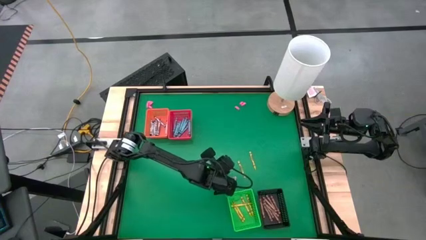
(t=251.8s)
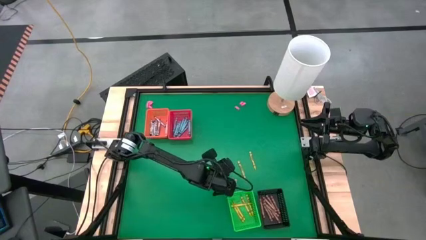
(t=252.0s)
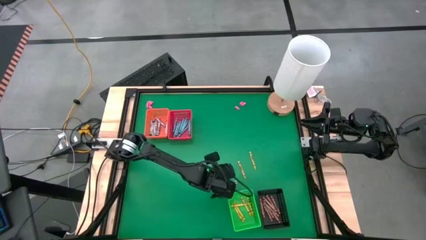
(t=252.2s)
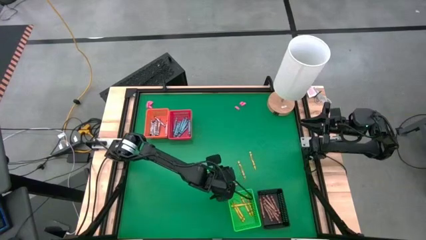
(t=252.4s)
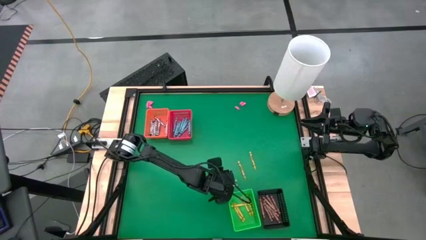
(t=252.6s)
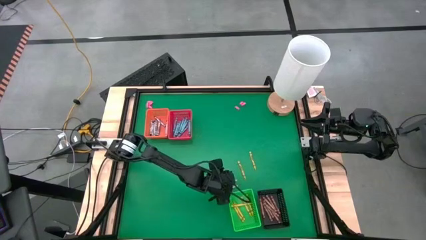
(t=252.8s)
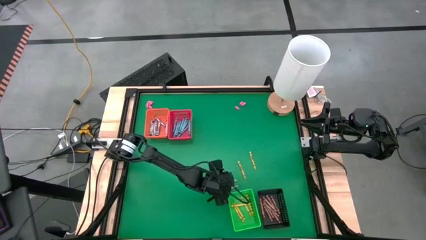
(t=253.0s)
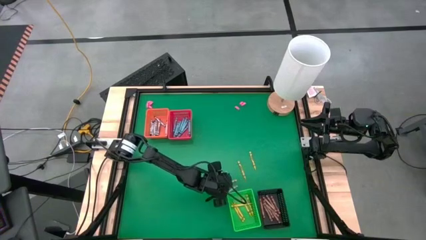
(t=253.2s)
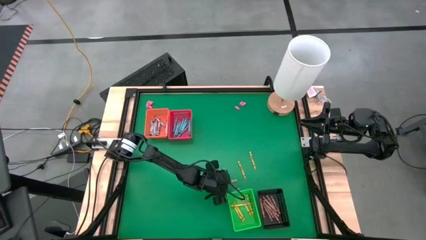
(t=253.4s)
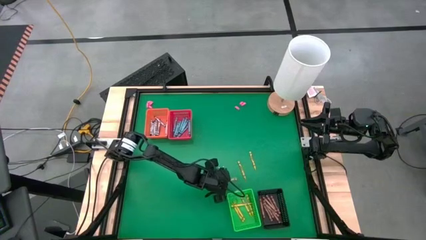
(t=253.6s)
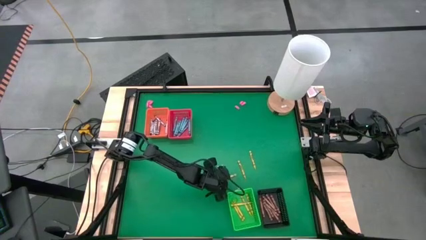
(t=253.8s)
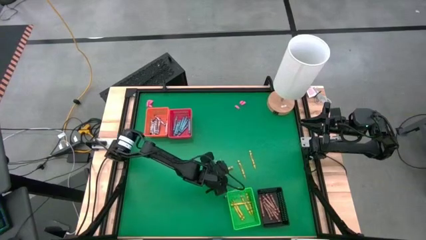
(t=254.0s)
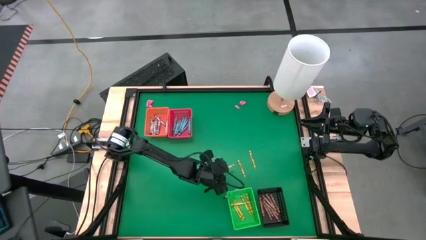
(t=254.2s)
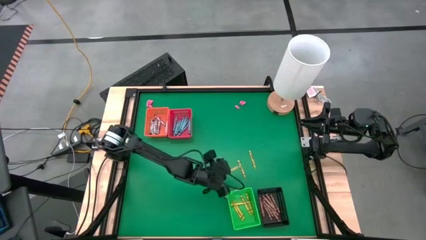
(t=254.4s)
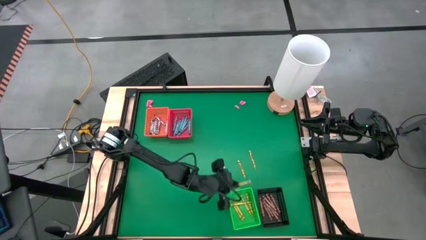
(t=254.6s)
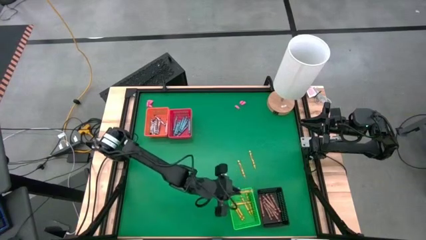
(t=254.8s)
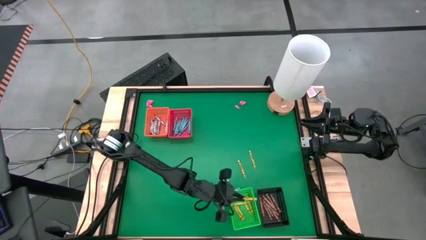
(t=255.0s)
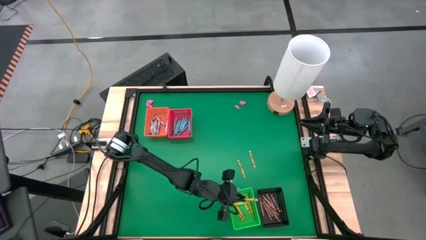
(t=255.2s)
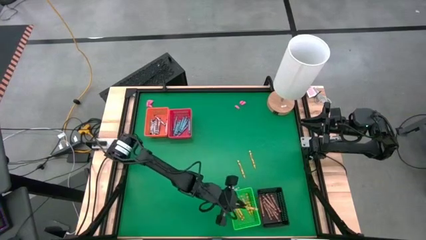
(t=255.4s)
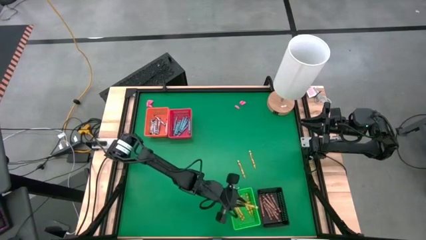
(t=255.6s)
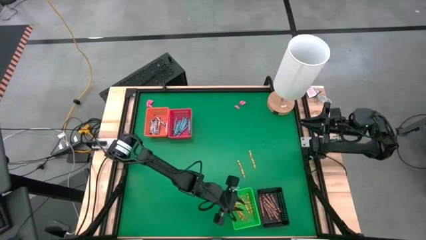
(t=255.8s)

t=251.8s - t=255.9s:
Task: Sort crayons
Put the yellow crayon into the green bin

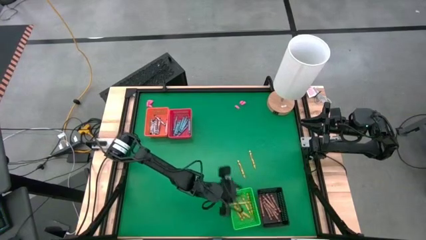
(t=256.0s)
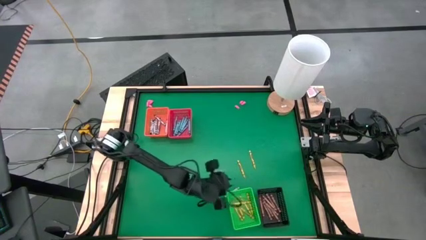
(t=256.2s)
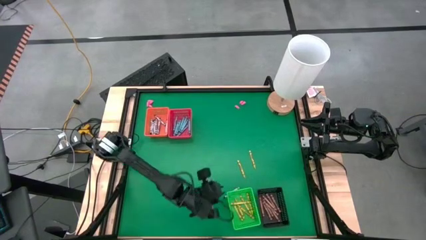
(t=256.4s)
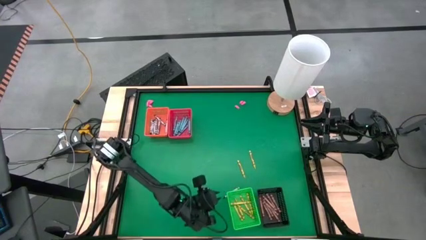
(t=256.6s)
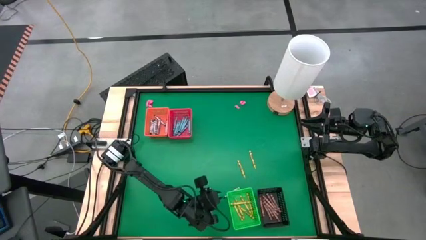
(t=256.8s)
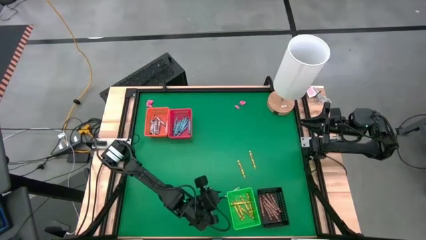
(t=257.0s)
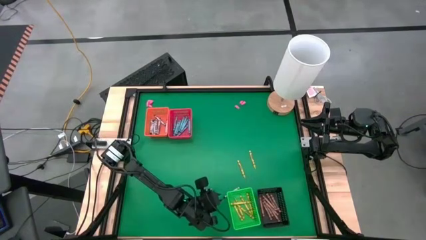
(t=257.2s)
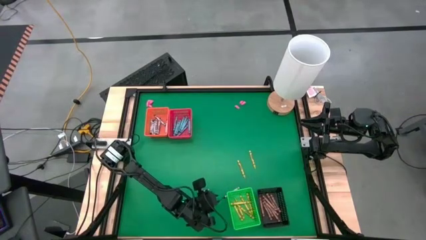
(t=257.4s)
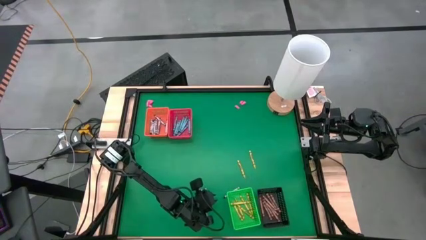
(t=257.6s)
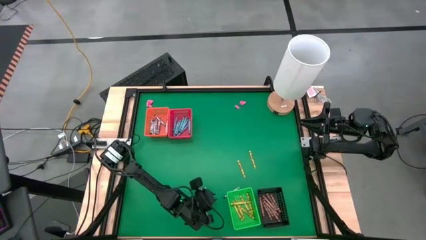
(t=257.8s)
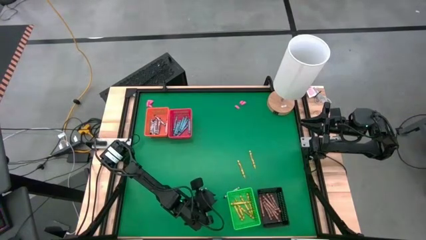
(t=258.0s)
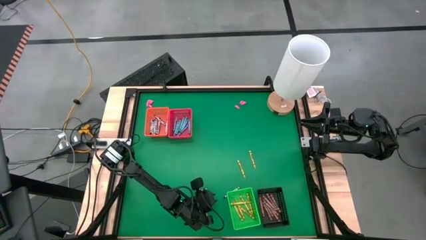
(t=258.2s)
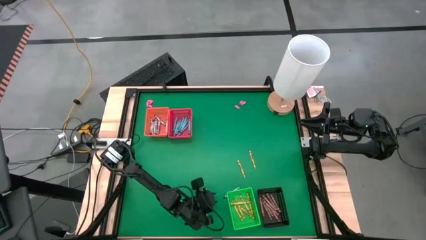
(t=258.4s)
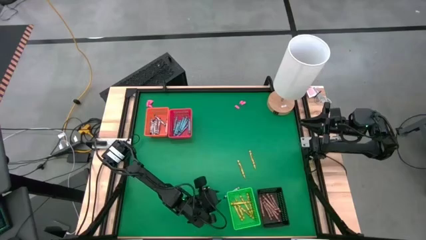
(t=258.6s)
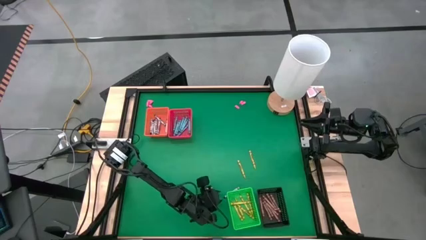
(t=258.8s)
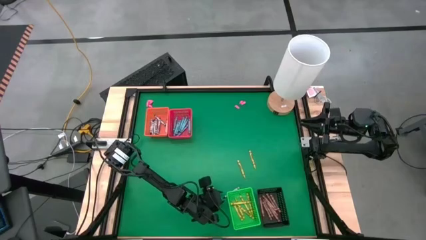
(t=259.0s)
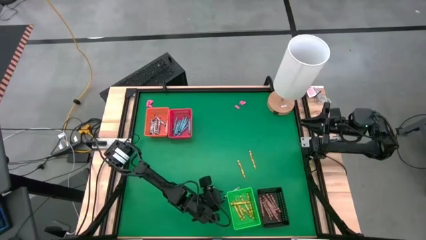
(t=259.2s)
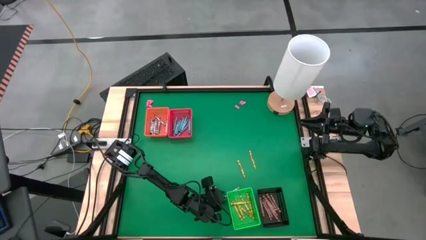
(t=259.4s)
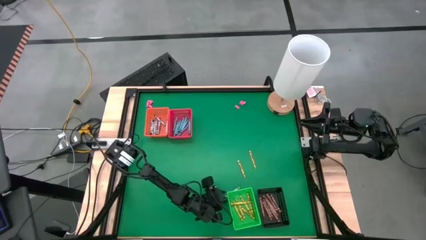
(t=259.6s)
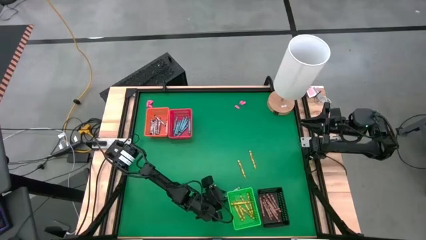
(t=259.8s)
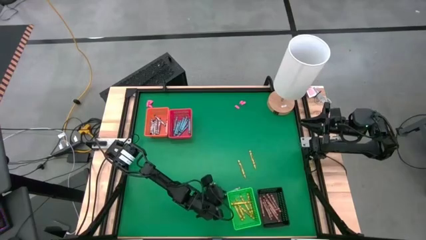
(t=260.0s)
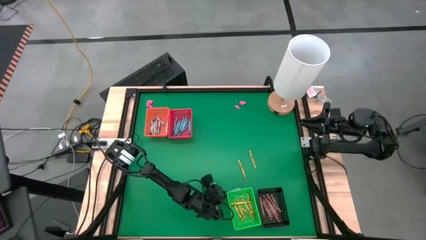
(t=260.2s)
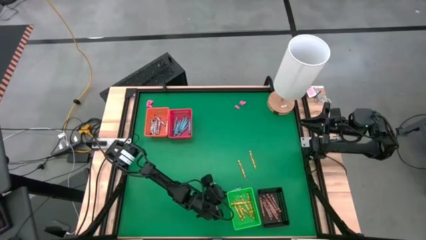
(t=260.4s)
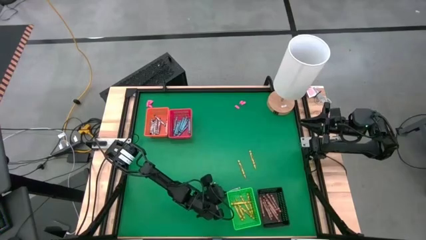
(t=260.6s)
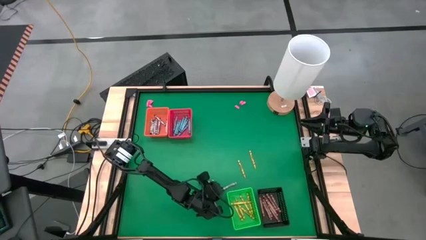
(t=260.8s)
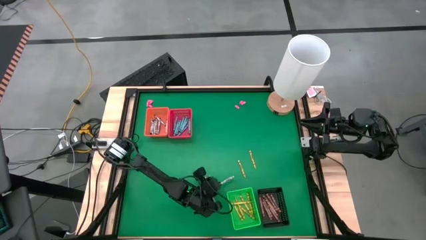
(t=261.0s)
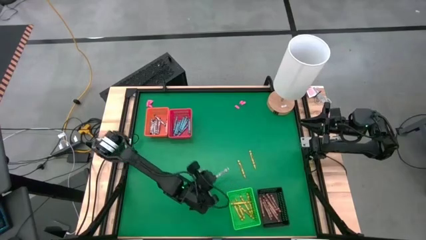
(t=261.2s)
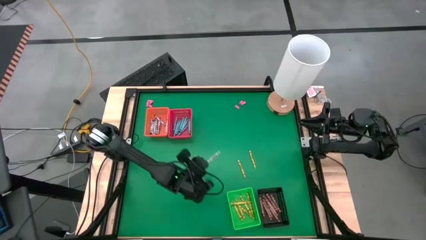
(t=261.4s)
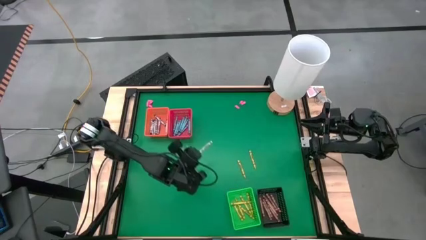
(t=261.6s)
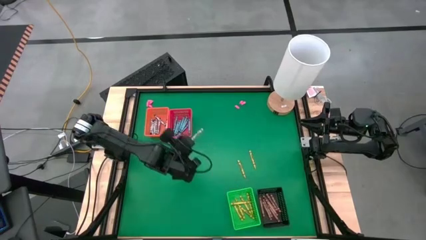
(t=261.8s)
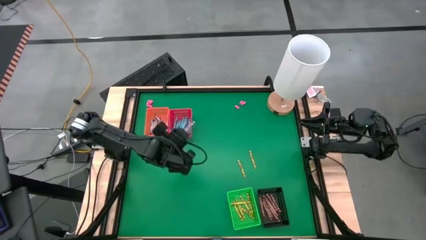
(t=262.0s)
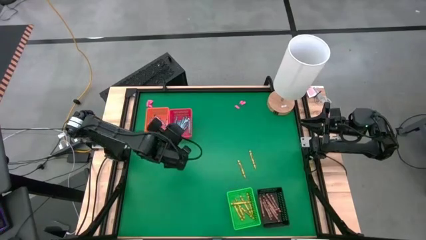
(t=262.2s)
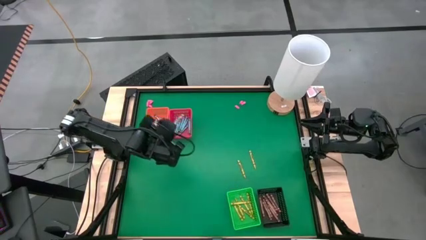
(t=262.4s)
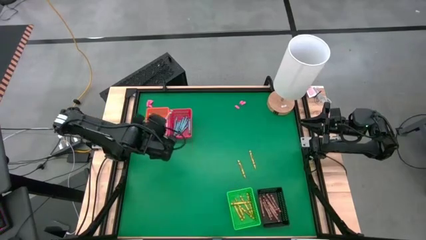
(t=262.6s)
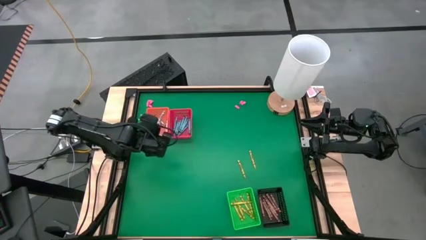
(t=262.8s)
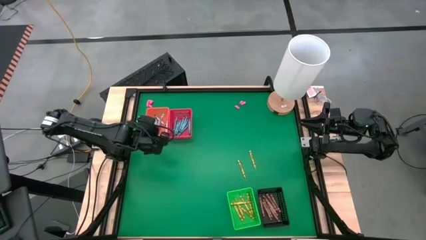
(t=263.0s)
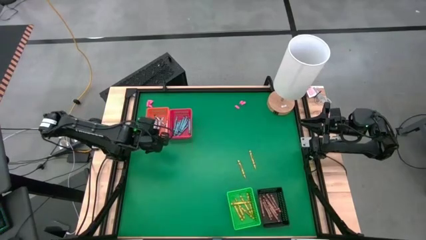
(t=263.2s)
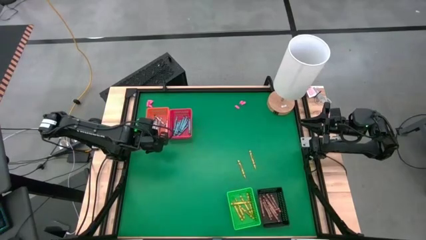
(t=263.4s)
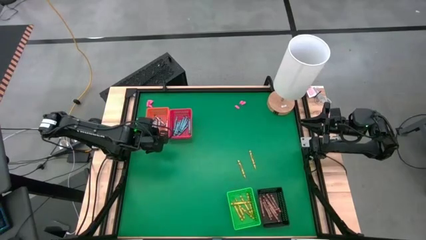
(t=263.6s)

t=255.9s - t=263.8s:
Put the black crayon into the orange bin

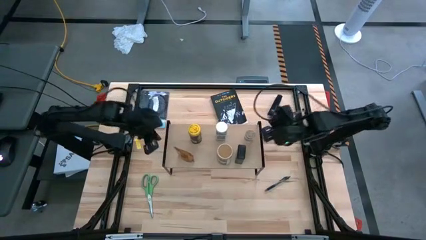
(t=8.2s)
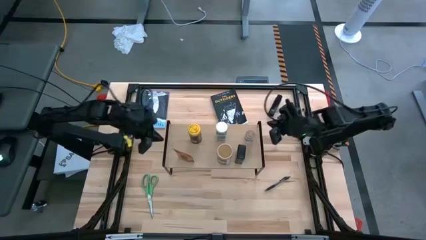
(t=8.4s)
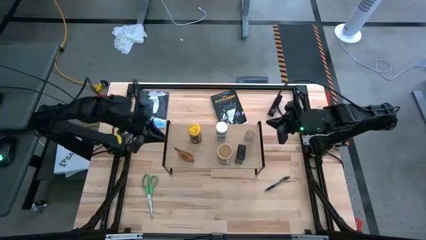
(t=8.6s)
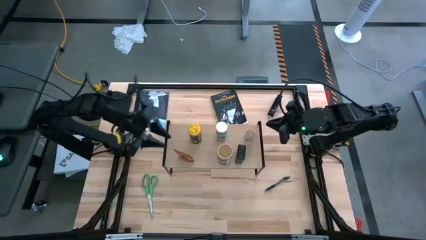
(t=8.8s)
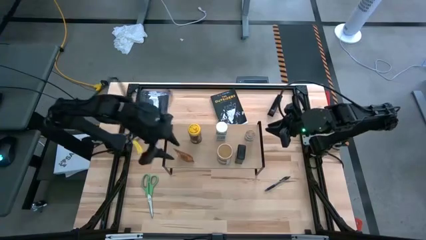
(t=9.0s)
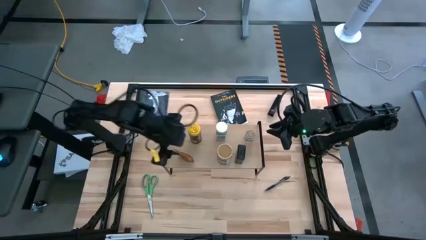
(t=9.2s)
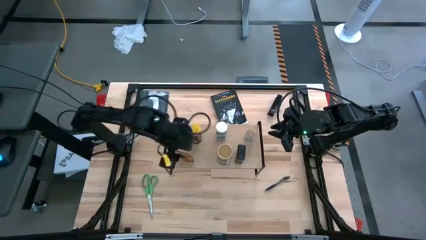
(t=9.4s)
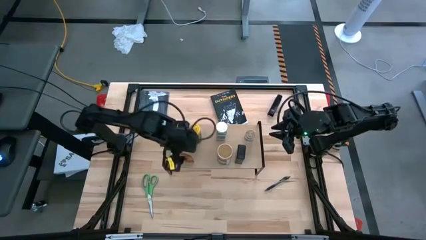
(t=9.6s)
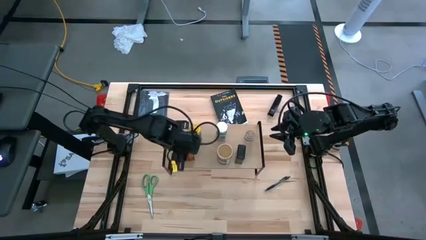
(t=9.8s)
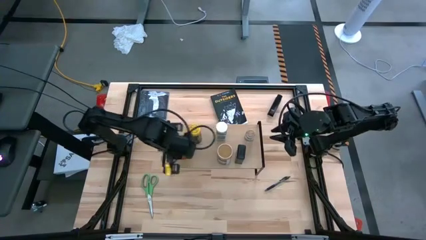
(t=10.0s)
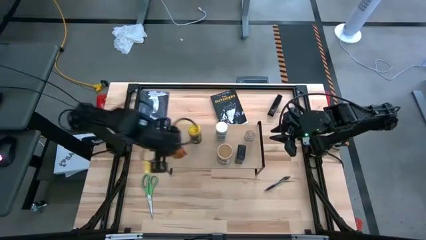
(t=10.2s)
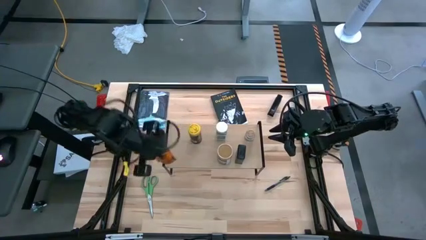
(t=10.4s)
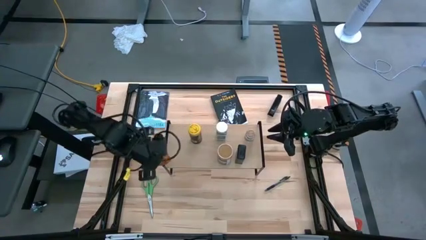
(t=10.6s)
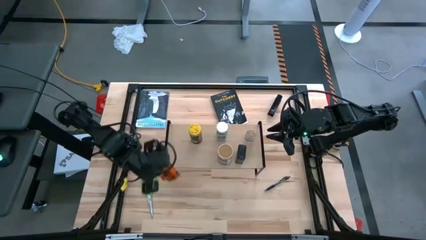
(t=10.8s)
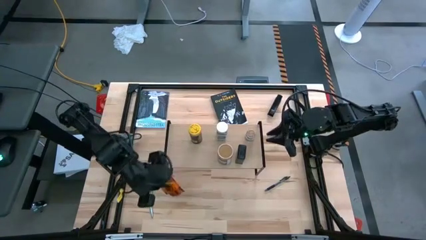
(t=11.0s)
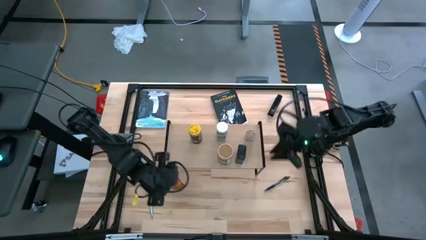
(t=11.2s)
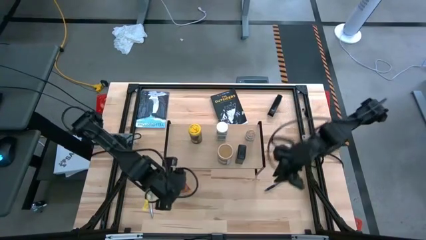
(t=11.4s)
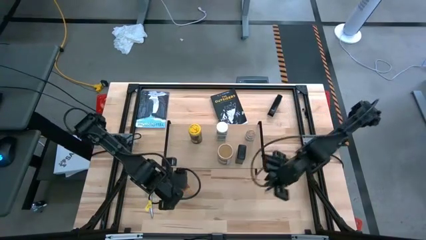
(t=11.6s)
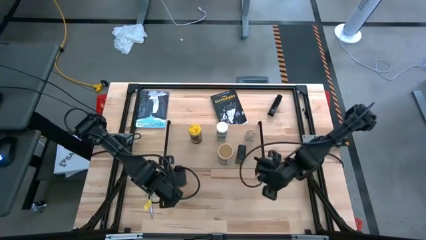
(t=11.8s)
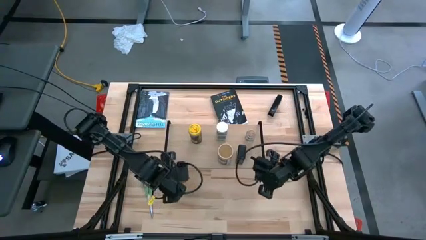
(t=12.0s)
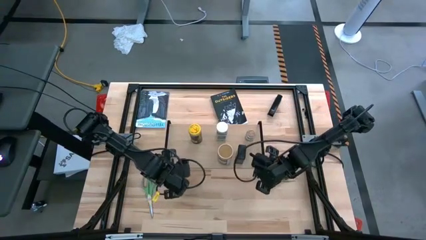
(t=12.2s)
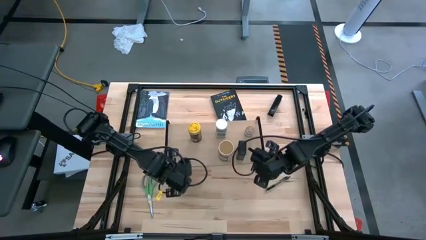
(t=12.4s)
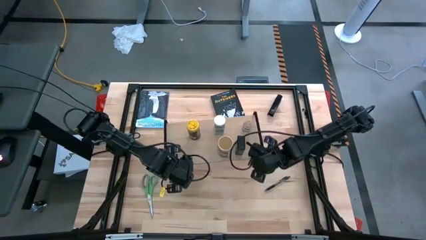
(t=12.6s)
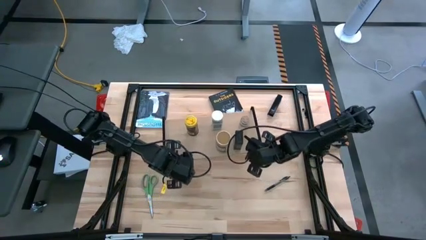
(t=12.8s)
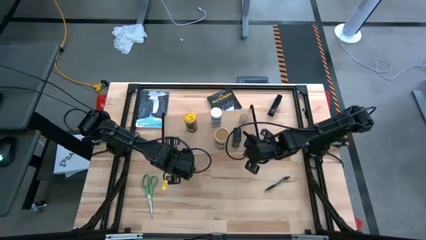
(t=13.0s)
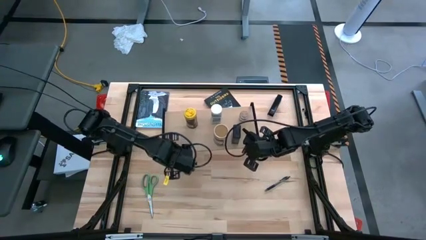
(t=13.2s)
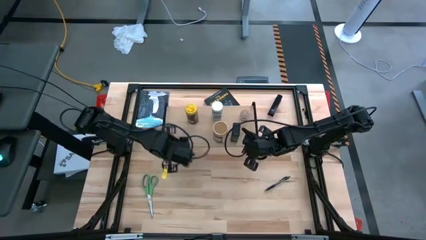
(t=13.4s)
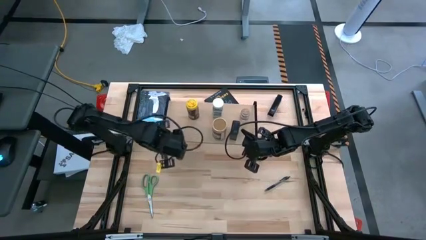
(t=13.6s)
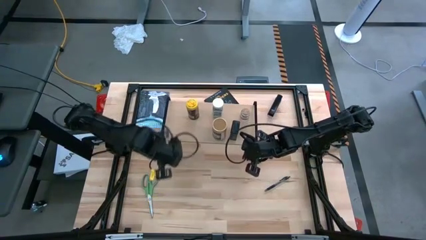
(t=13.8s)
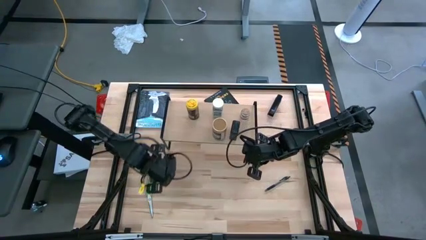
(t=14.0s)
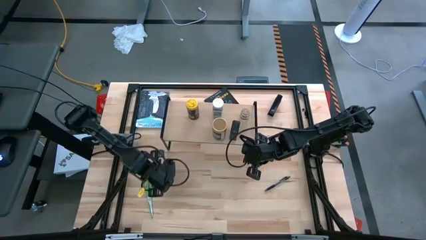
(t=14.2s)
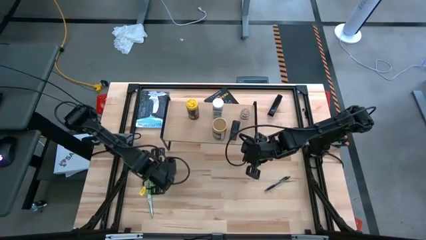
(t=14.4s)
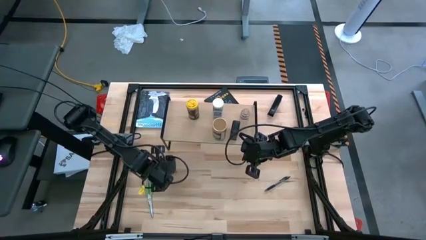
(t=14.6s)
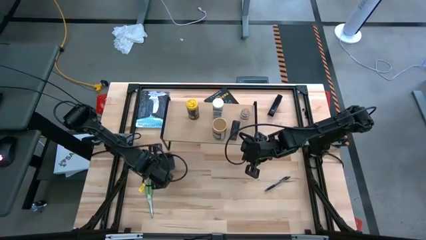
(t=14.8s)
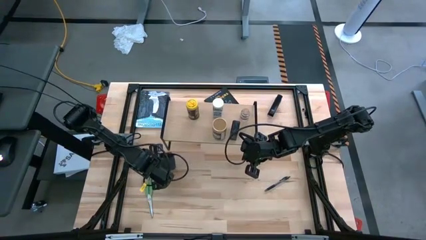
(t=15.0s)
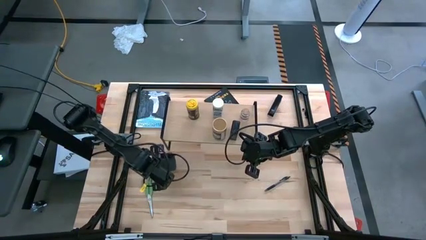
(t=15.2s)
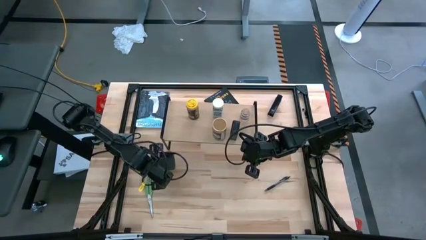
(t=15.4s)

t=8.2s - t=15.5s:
Task: Shelf spices
Remove the orange seasoning pack from the shelf
